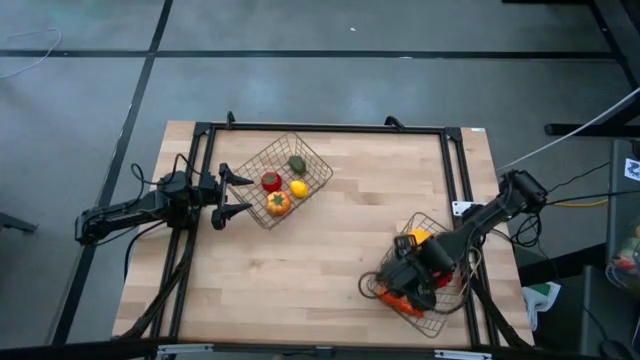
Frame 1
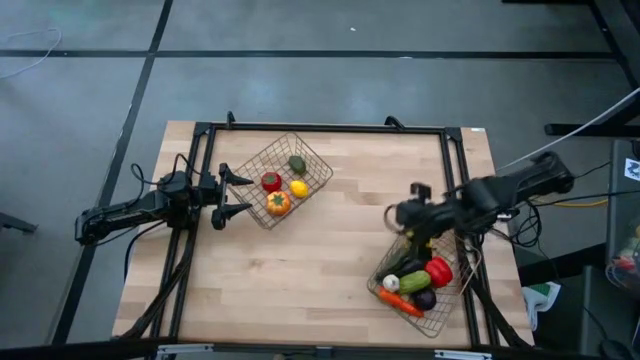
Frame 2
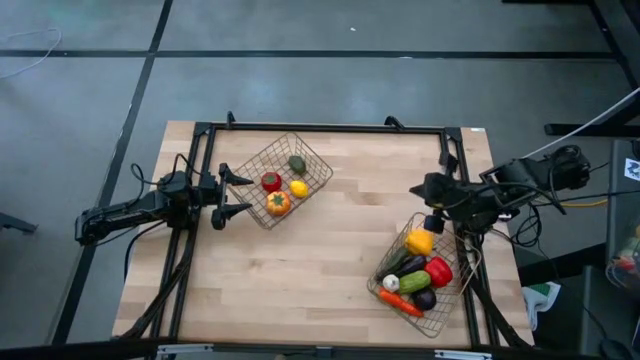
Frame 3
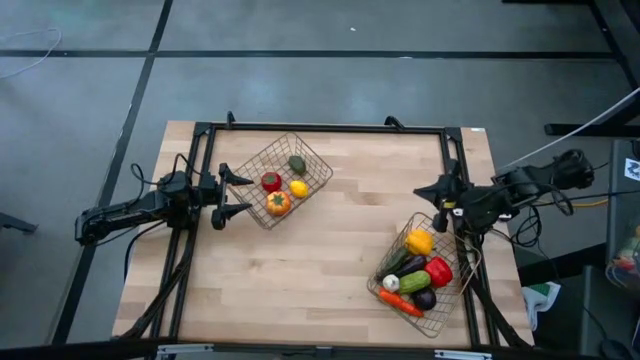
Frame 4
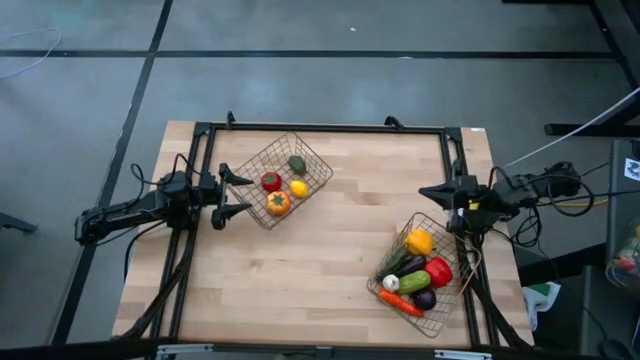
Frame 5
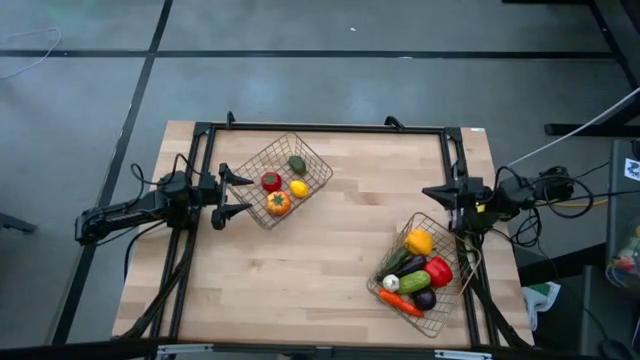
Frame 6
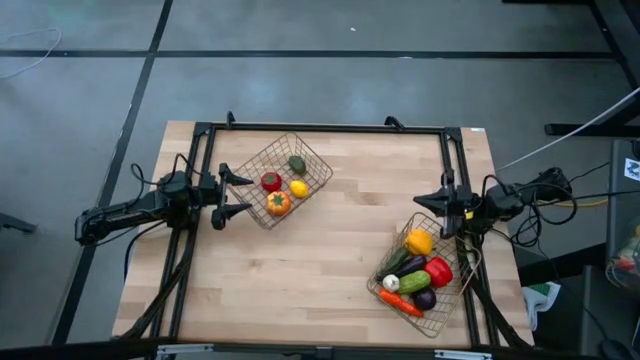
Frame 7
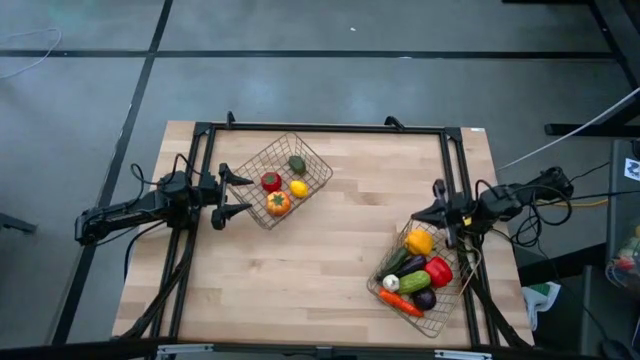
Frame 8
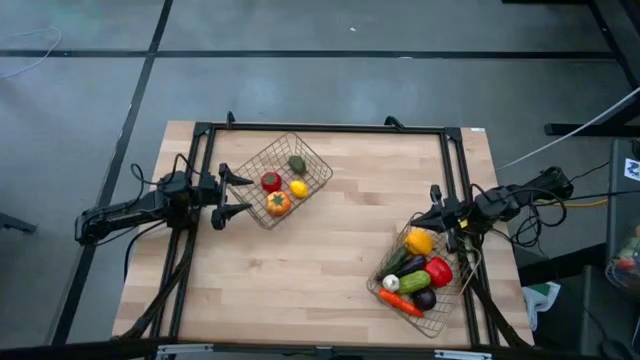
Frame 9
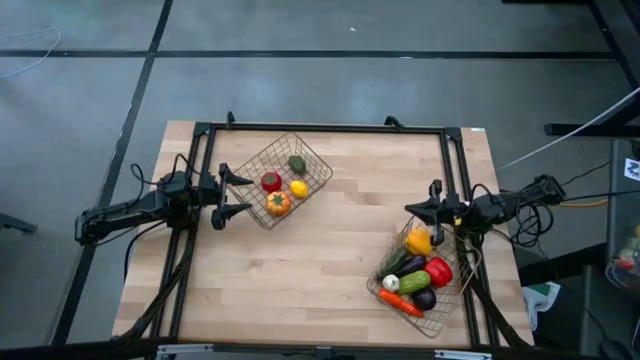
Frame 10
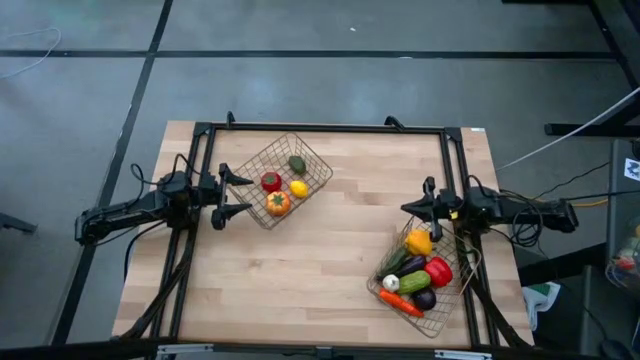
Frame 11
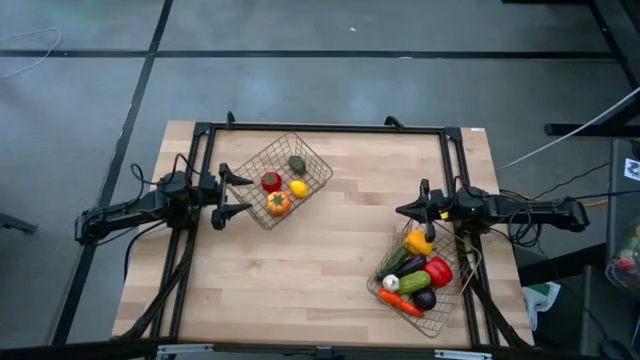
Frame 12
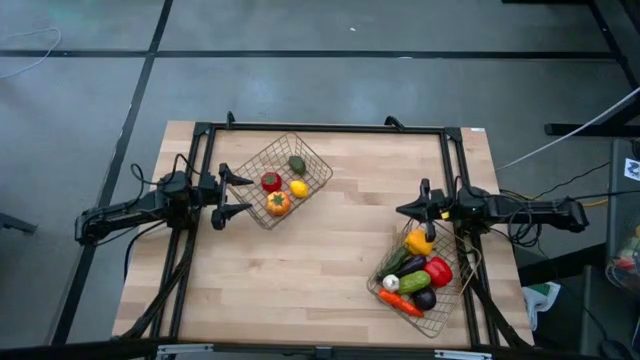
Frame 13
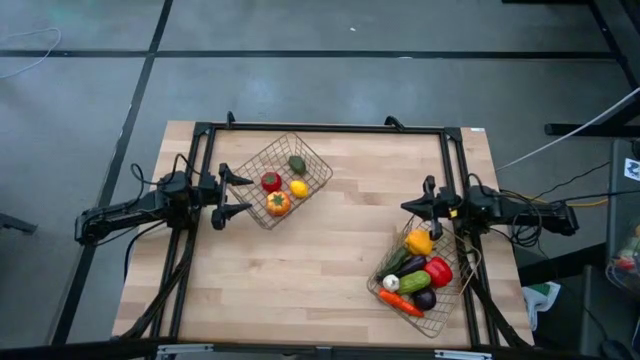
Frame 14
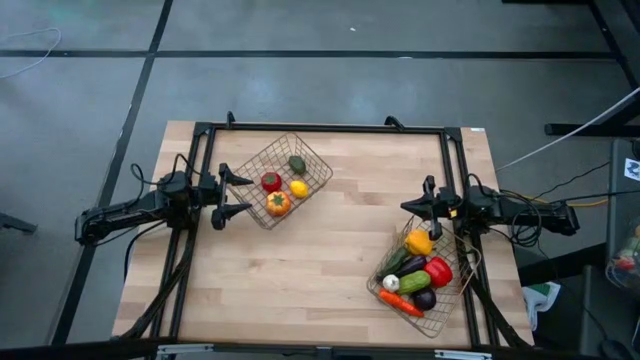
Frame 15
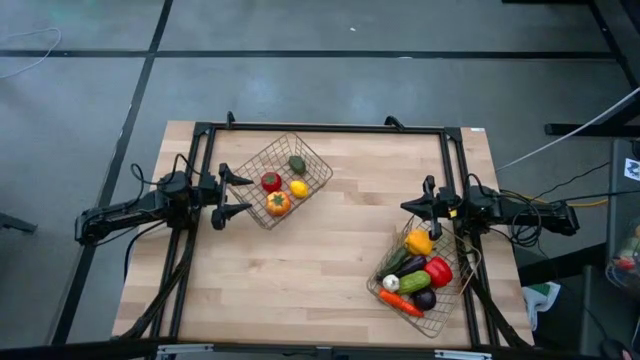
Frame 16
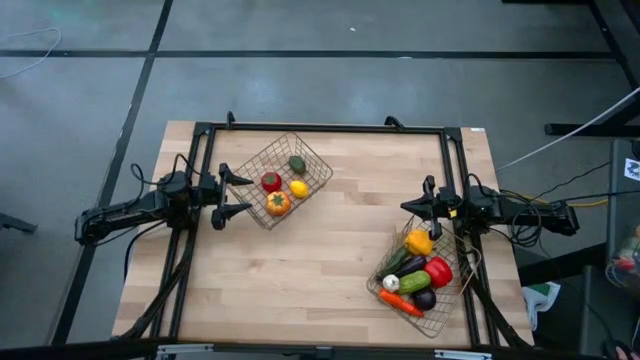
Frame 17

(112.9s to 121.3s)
Task: Sort produce into baskets
Return to Home Position

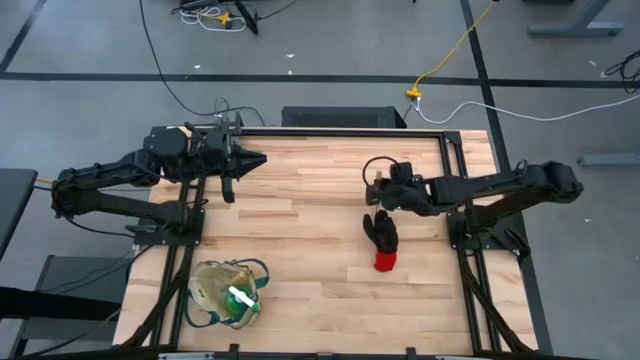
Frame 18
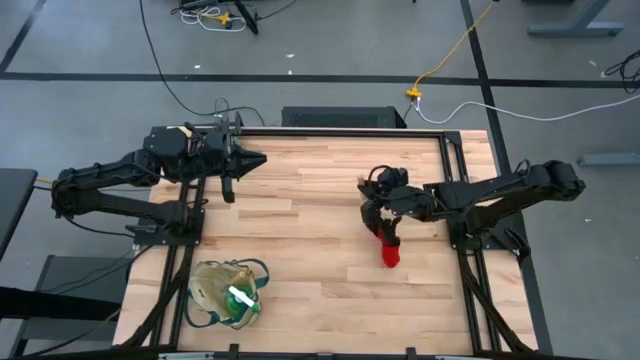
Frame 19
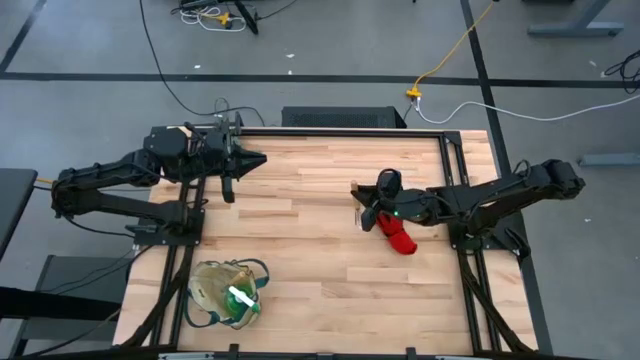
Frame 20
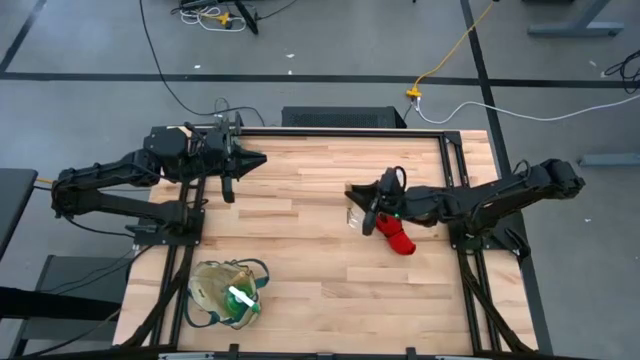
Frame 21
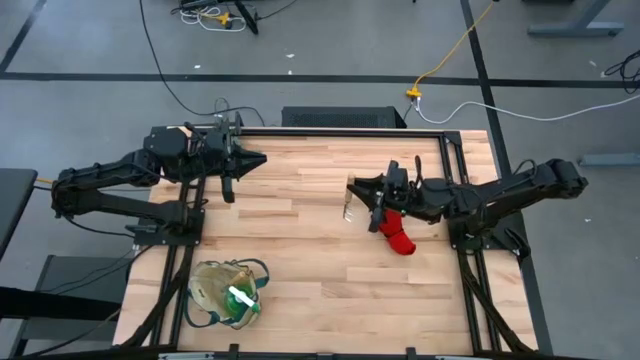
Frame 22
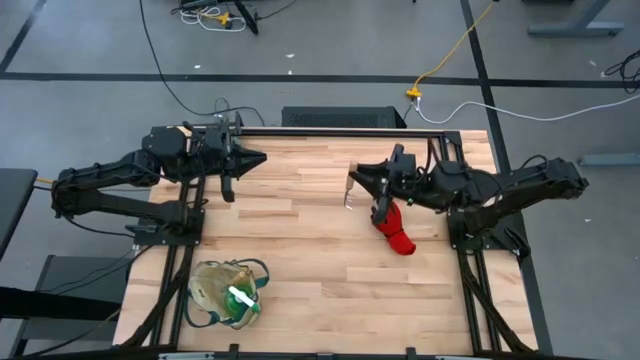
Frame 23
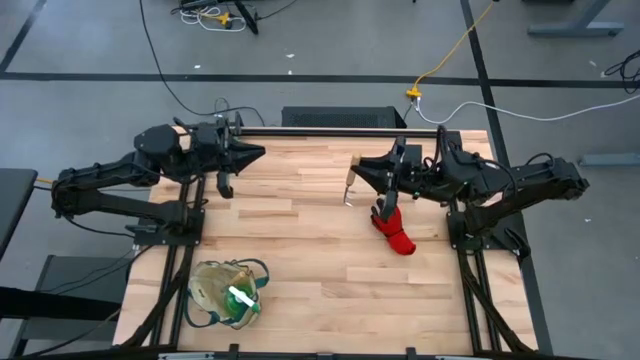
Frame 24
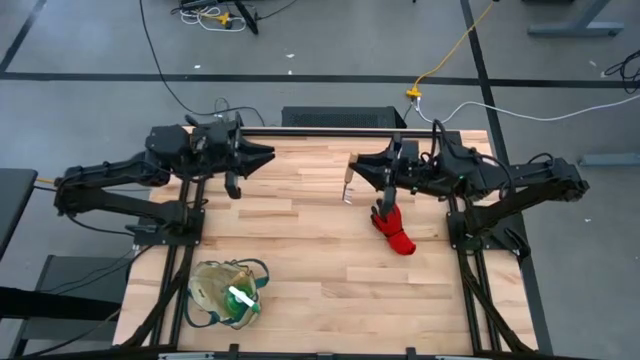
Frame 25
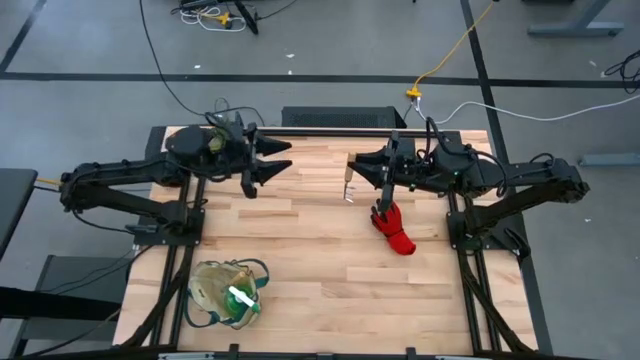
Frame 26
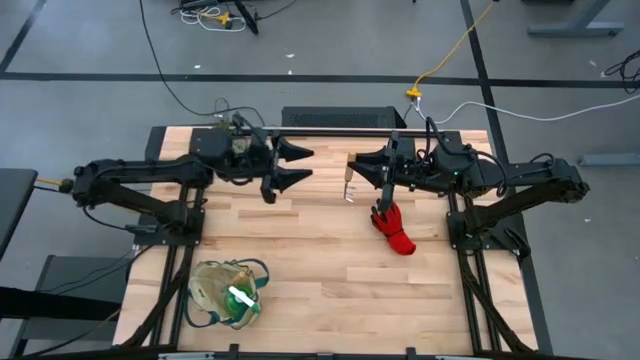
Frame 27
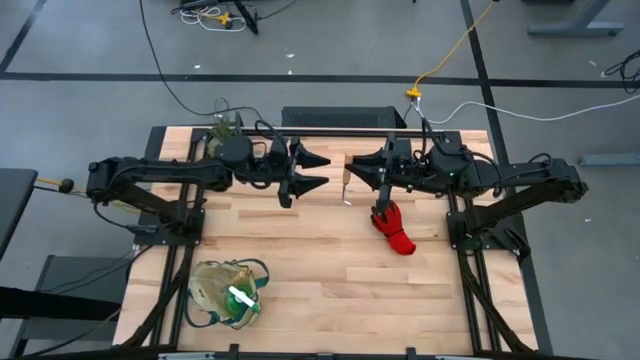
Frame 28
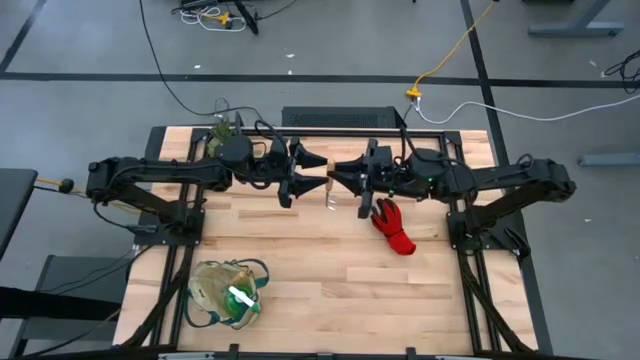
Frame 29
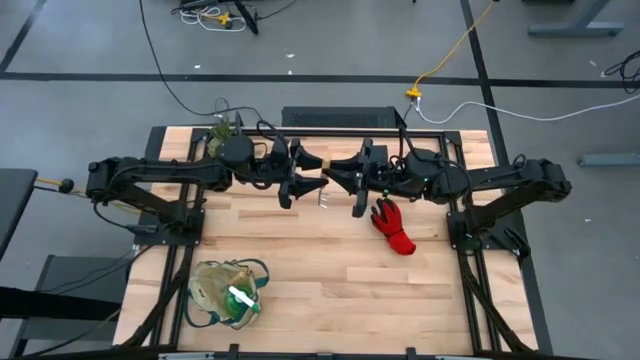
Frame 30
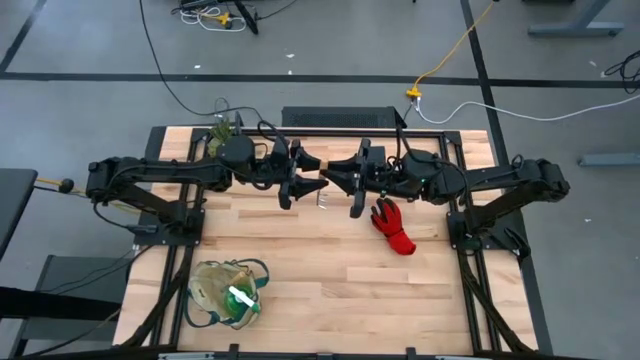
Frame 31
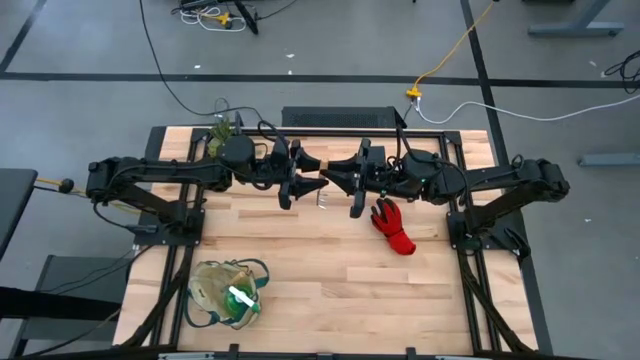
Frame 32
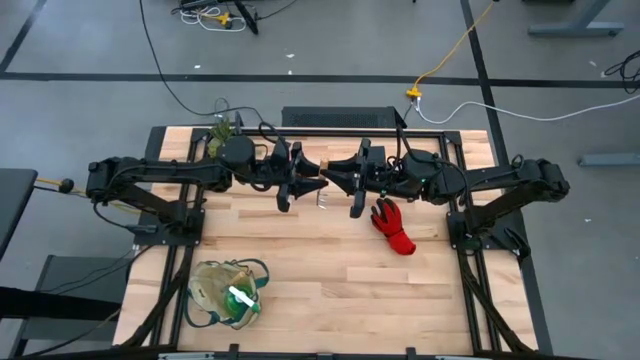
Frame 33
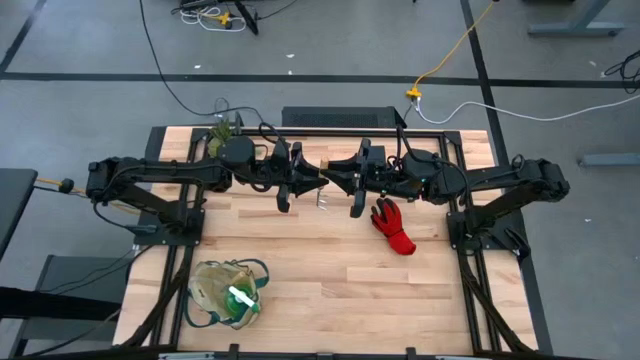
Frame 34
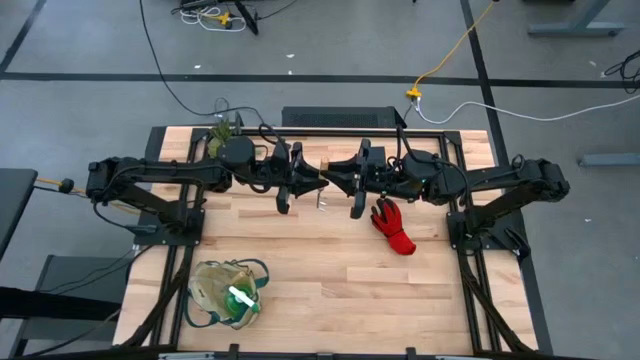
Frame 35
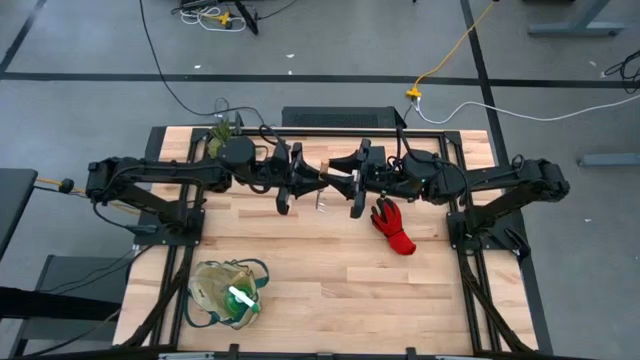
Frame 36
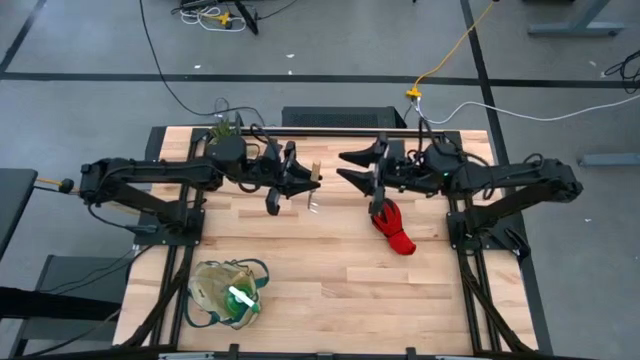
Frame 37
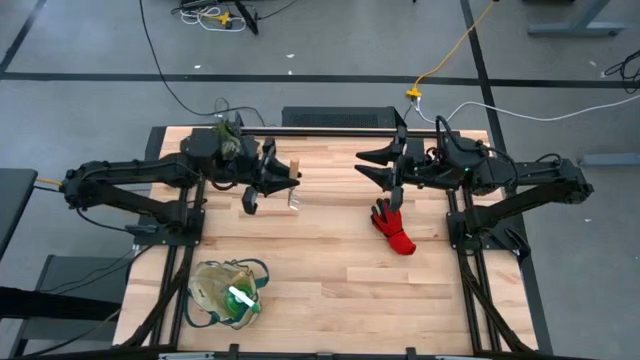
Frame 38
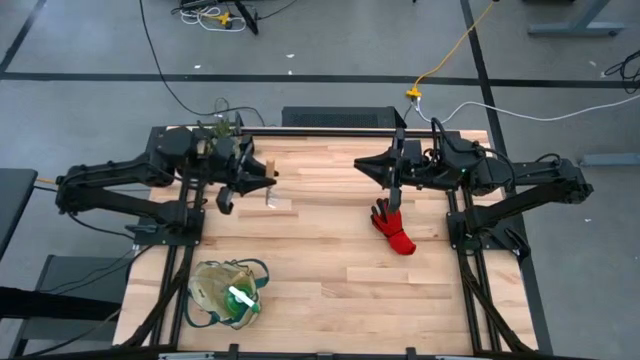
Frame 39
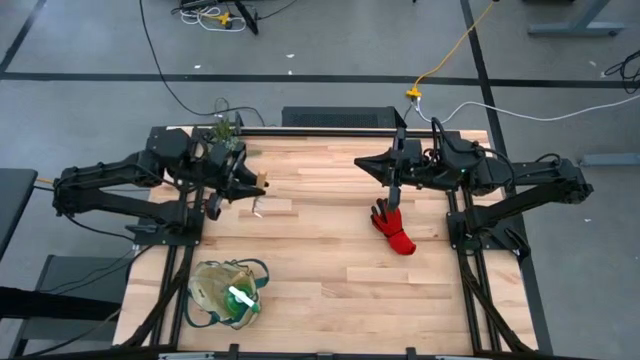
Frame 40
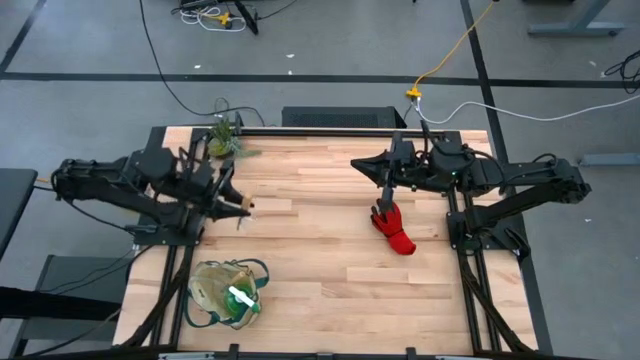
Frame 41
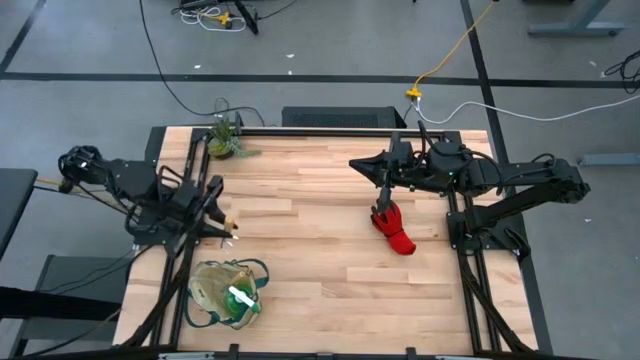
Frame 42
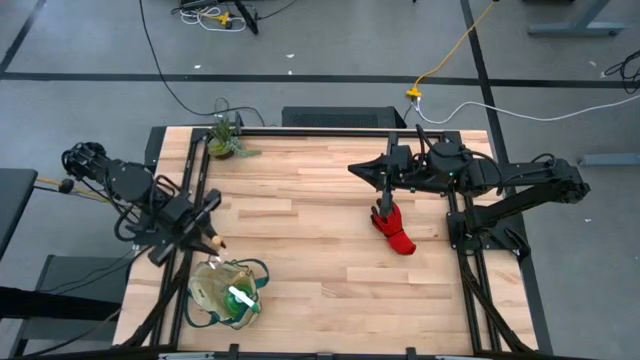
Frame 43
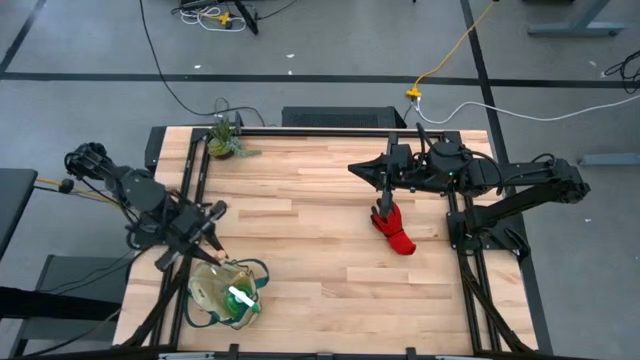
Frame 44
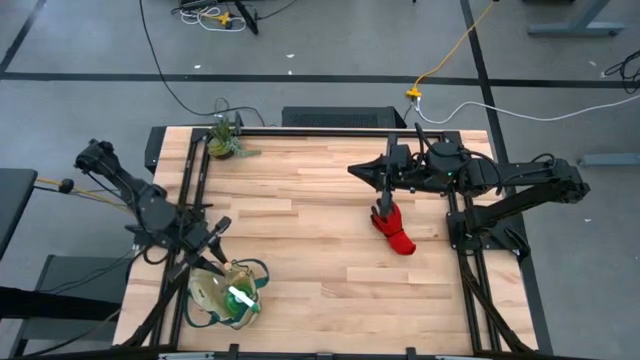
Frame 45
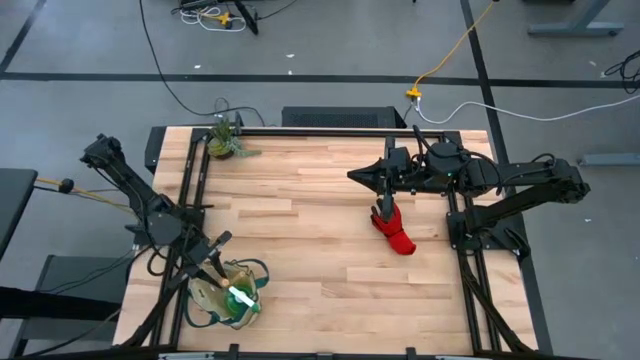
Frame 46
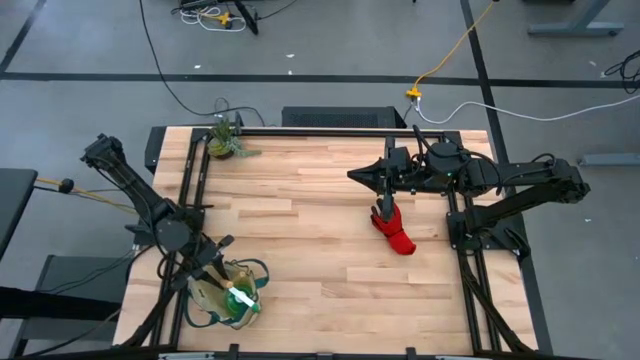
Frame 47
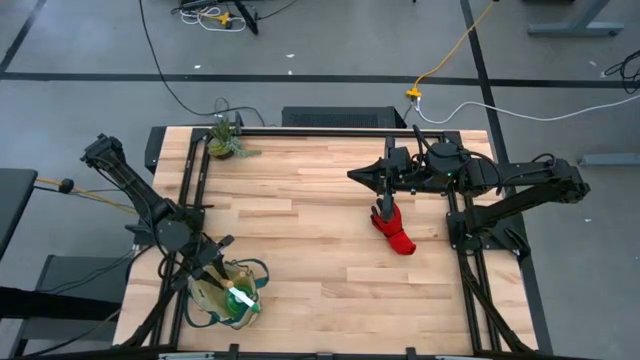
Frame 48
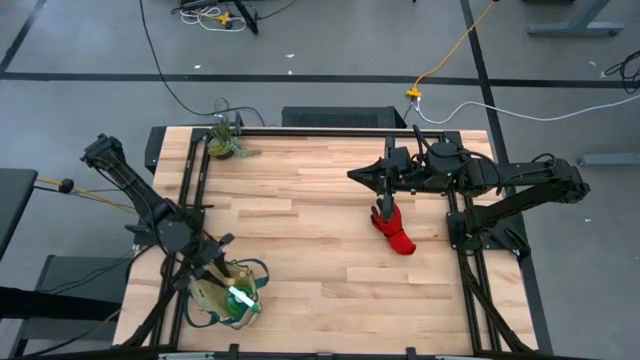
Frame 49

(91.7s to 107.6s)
Task: Pick & Place Garden tools in Gardening bag
Put the brown hand rake into the white gardening bag
